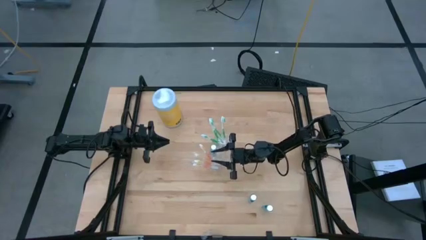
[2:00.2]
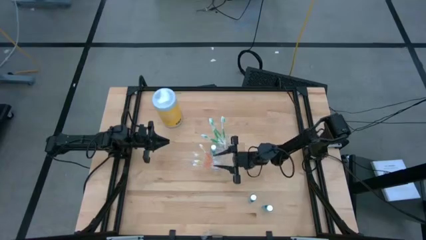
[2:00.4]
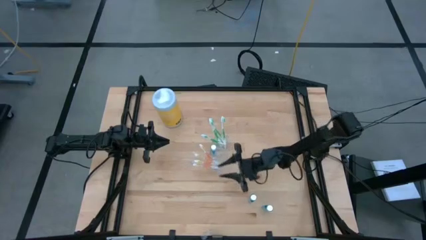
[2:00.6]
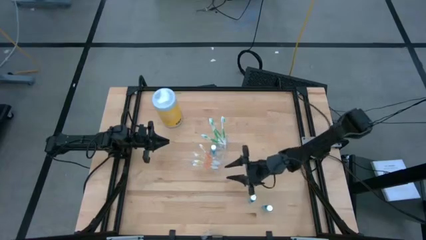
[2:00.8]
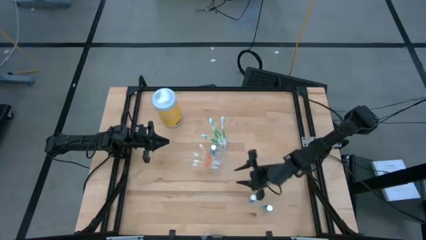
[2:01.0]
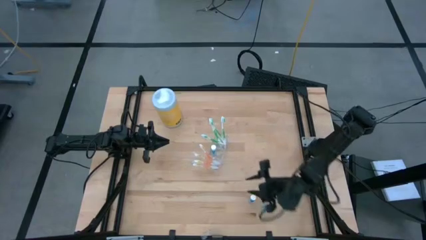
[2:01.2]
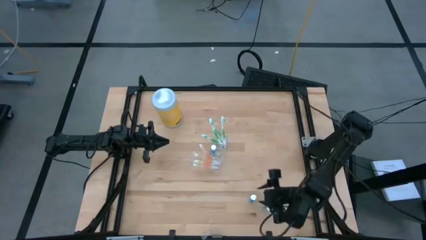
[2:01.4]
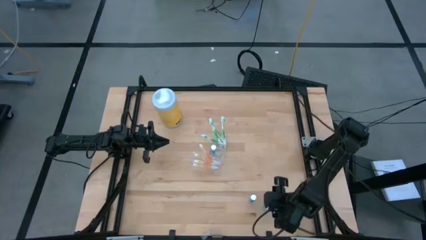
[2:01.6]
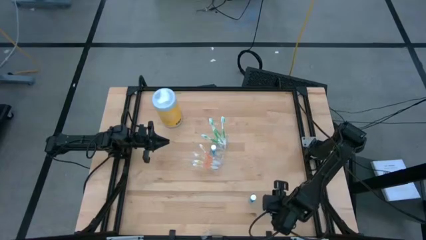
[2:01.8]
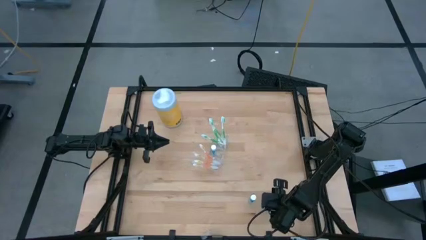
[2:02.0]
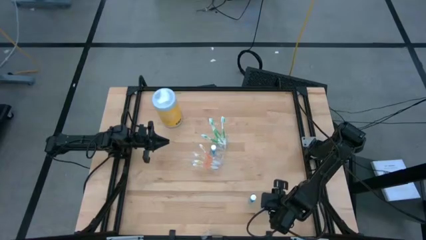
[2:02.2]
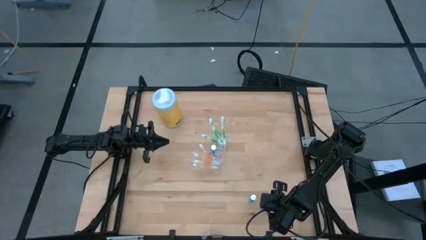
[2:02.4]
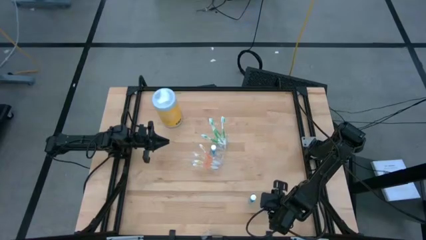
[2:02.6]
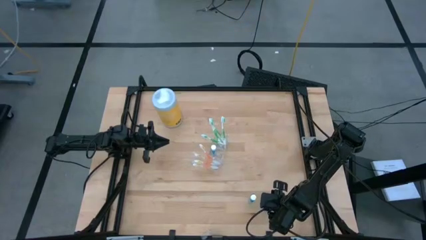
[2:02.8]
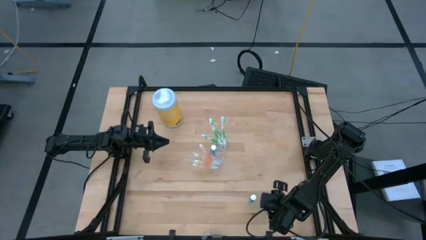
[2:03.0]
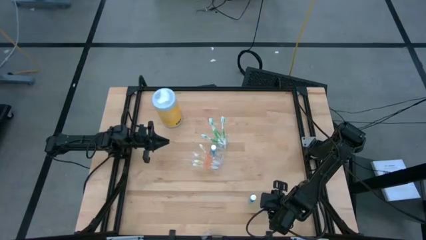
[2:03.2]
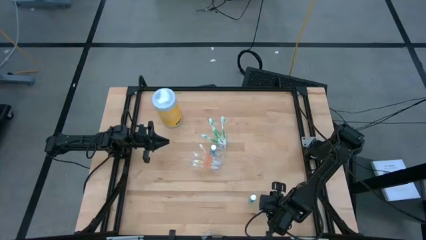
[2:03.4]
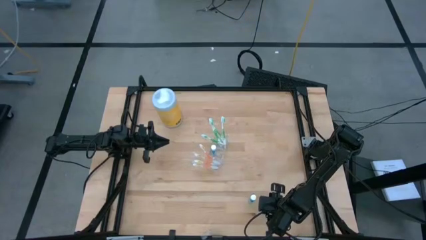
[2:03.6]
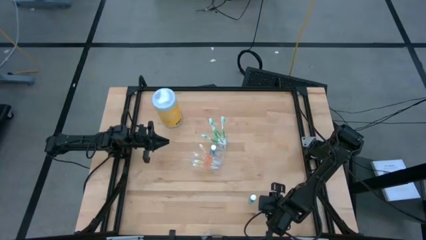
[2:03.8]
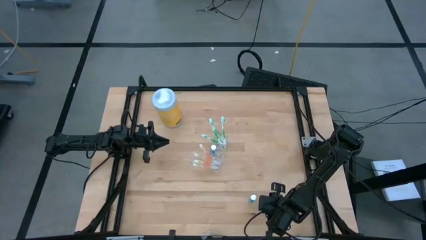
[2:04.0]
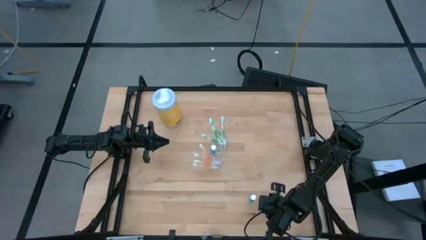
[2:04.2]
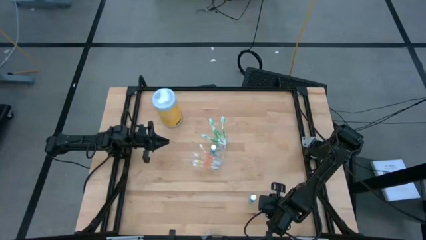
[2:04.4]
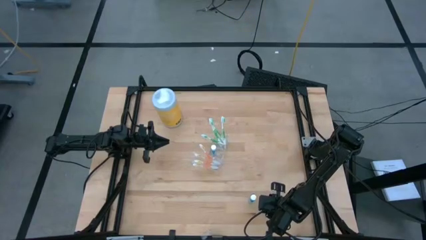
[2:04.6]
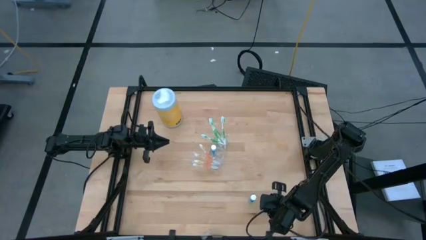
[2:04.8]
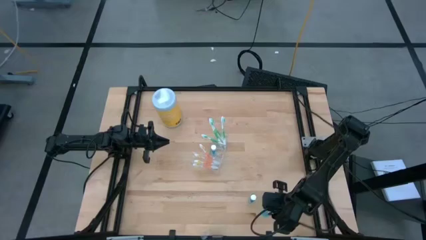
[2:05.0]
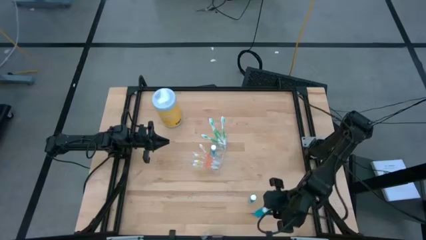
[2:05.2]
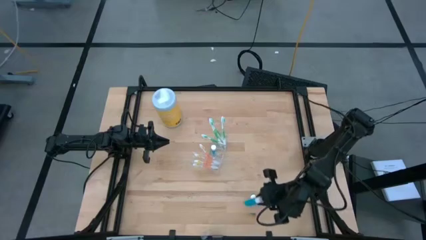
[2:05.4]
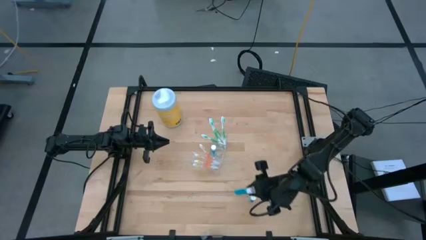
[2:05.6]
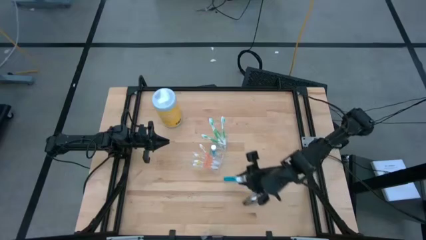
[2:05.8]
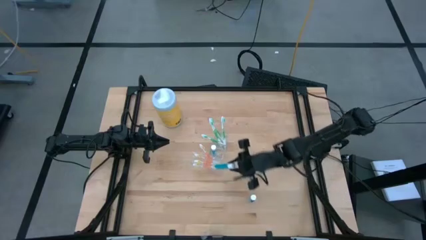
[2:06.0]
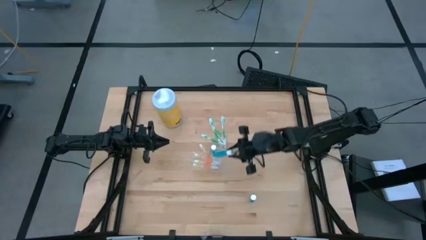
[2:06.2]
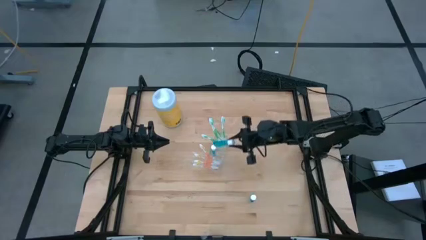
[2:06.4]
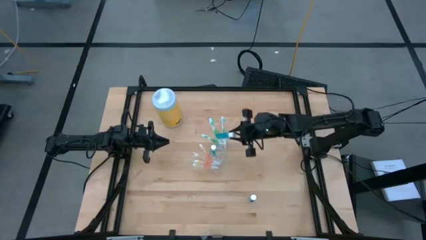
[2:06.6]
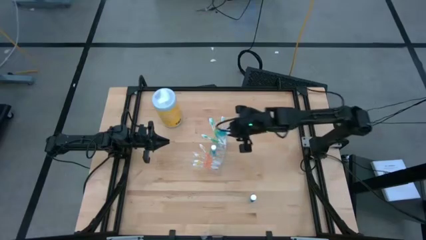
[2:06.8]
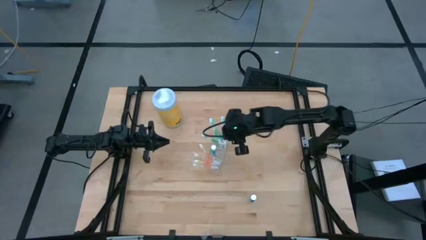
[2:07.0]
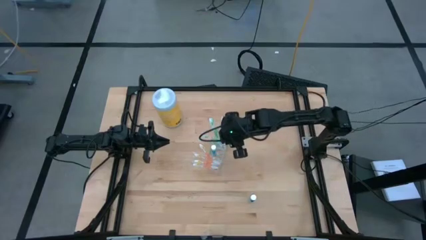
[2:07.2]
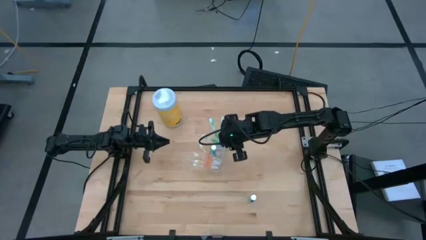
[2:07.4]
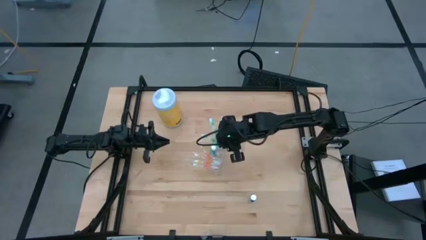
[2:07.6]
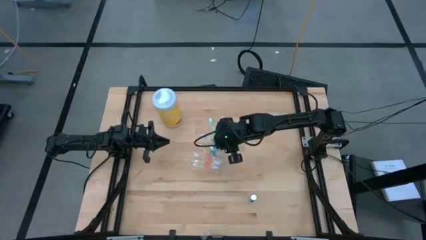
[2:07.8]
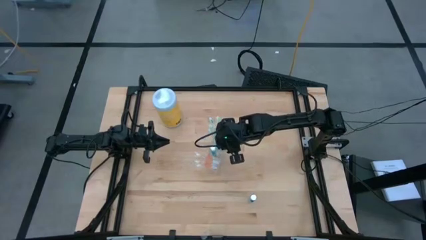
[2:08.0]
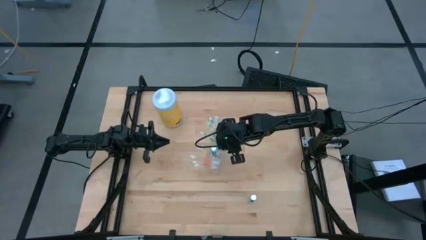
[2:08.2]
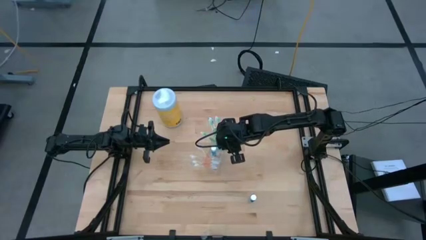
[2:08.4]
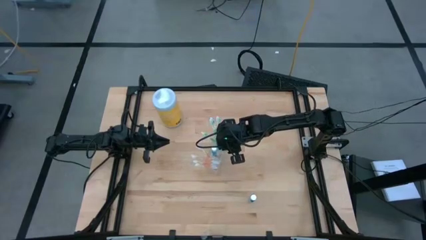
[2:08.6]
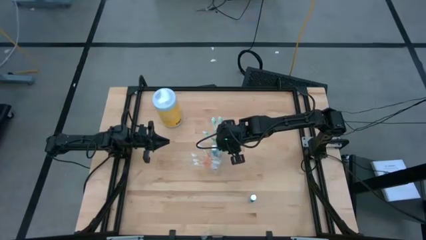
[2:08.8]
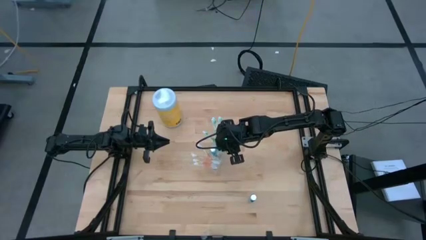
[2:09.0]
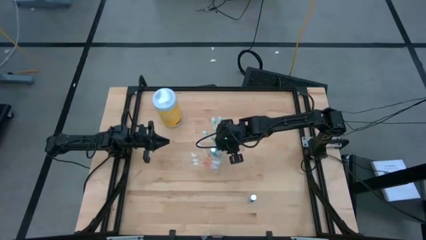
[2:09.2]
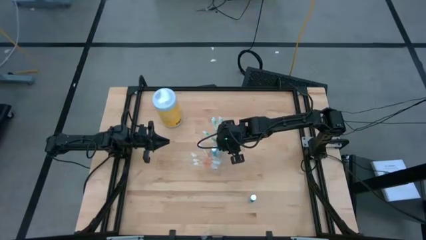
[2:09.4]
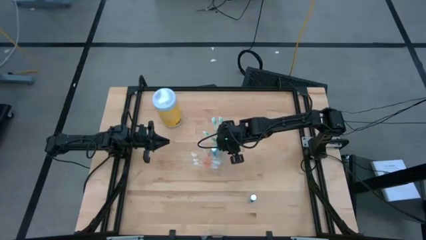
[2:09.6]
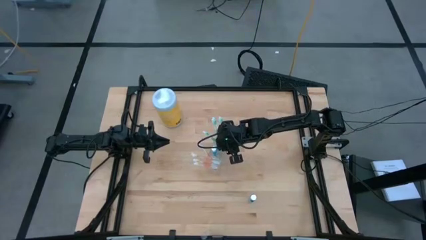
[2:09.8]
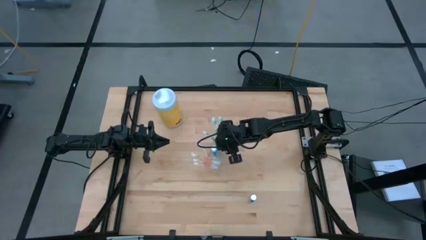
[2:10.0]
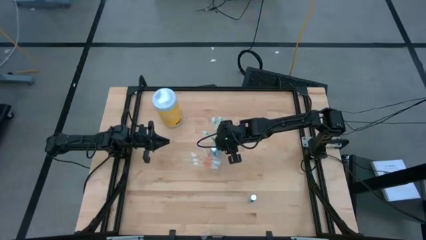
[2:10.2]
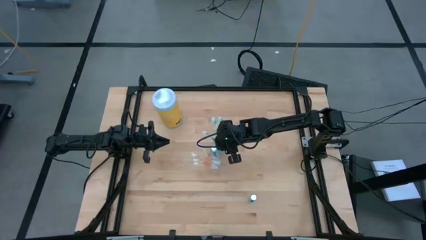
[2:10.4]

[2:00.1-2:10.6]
Task: Pick & Place toothbrushing station
Put the blue mouthwash bottle into the transparent organizer

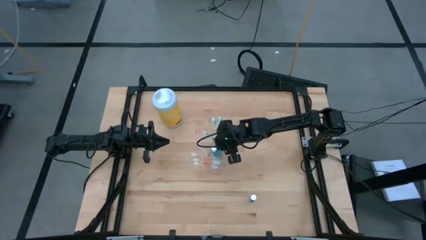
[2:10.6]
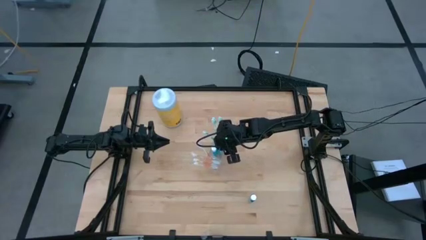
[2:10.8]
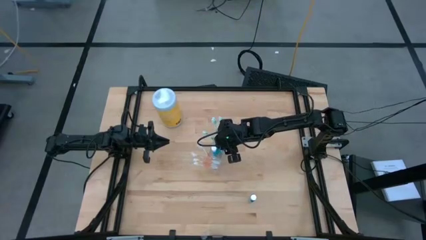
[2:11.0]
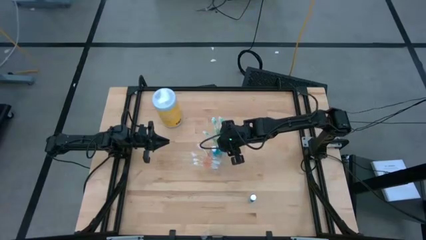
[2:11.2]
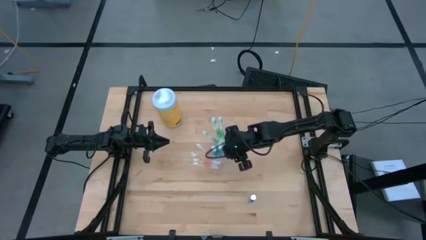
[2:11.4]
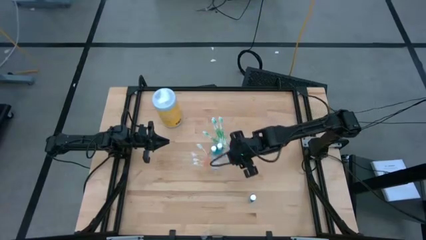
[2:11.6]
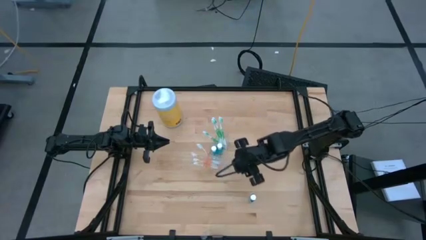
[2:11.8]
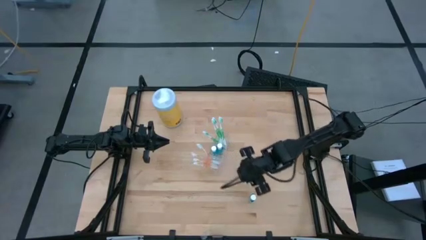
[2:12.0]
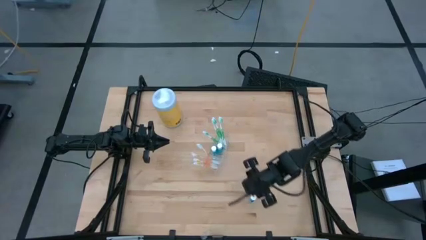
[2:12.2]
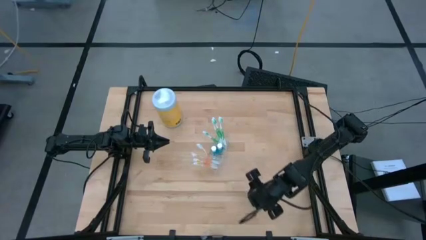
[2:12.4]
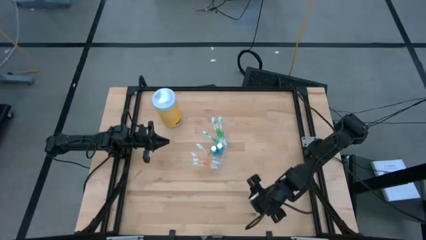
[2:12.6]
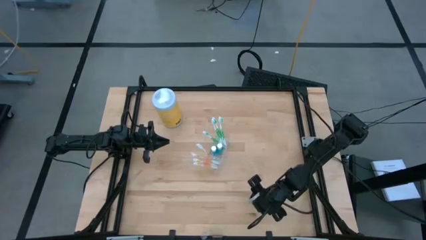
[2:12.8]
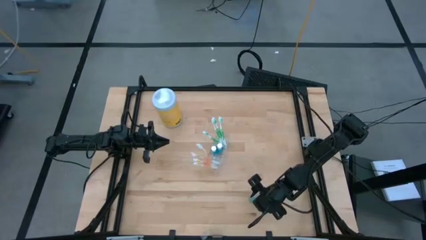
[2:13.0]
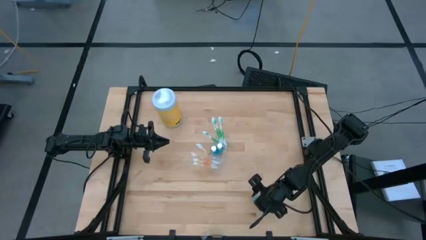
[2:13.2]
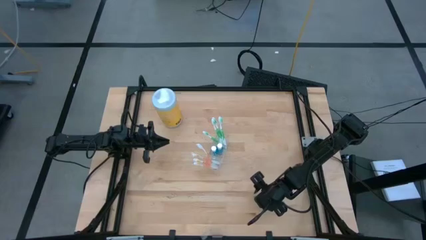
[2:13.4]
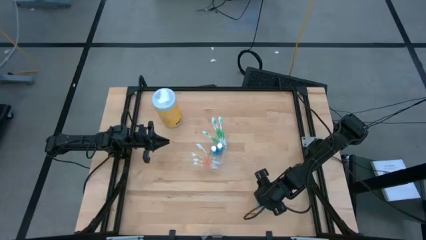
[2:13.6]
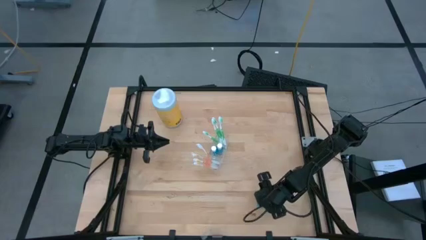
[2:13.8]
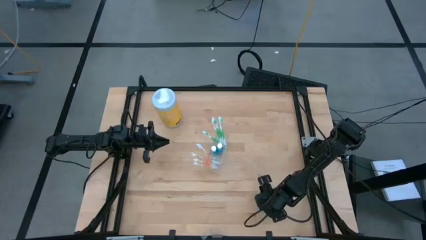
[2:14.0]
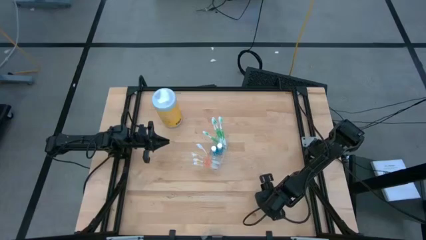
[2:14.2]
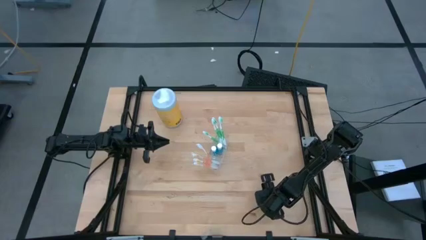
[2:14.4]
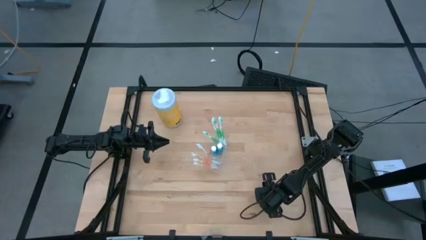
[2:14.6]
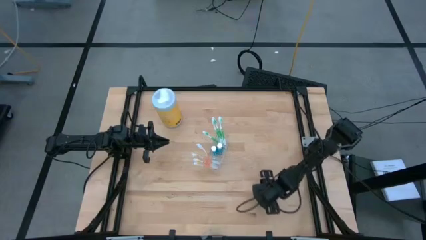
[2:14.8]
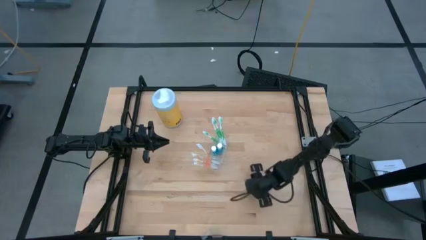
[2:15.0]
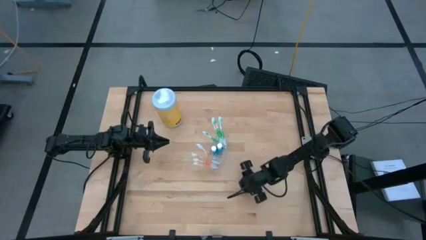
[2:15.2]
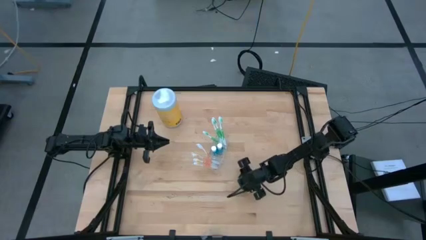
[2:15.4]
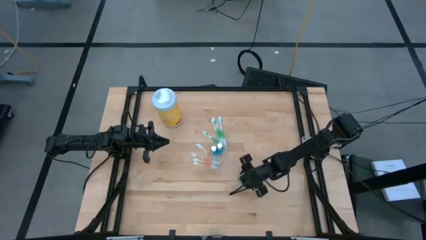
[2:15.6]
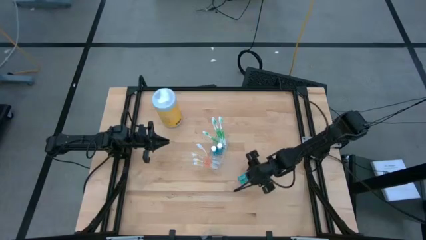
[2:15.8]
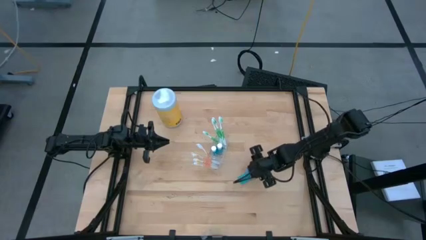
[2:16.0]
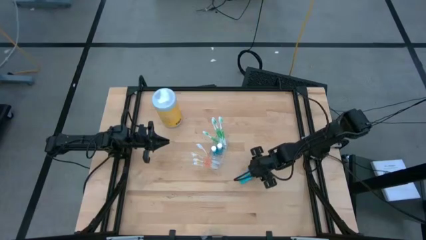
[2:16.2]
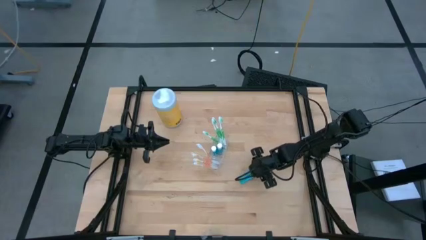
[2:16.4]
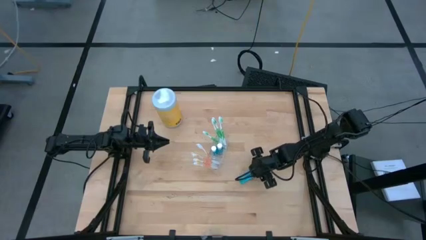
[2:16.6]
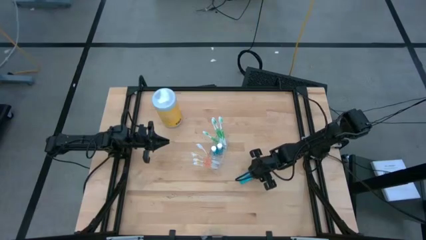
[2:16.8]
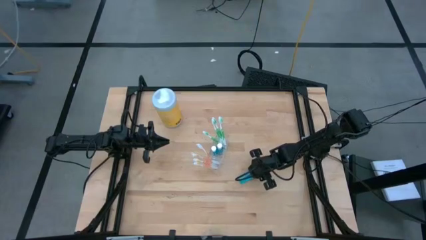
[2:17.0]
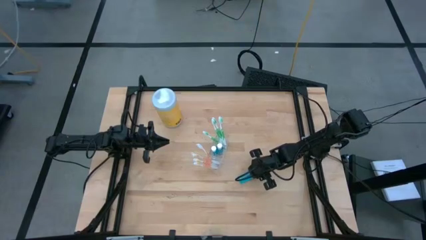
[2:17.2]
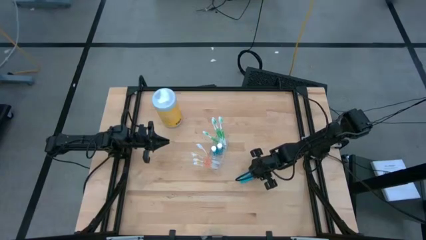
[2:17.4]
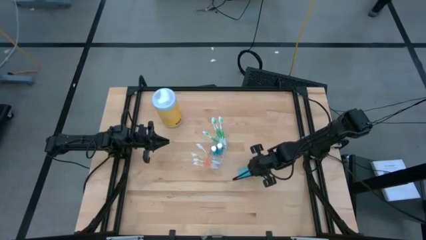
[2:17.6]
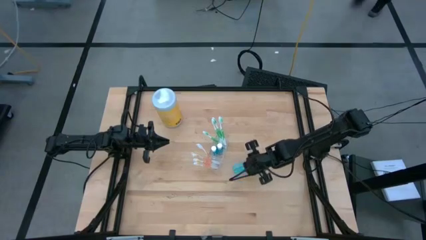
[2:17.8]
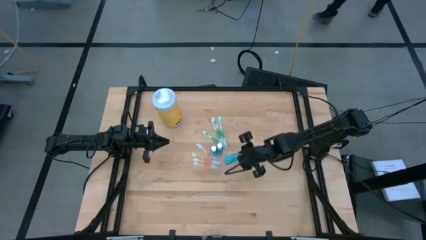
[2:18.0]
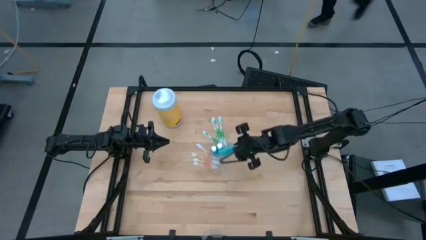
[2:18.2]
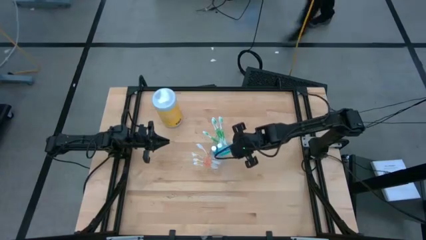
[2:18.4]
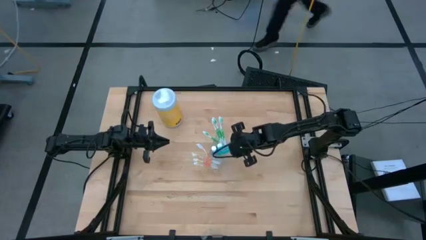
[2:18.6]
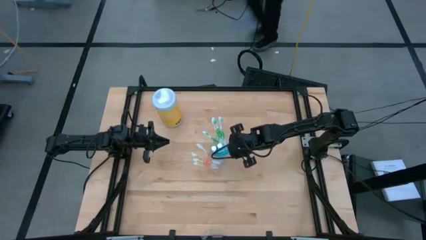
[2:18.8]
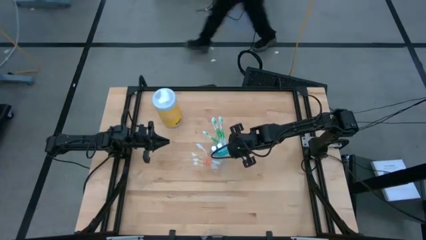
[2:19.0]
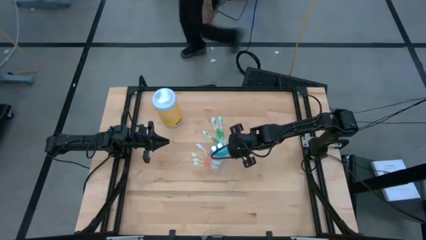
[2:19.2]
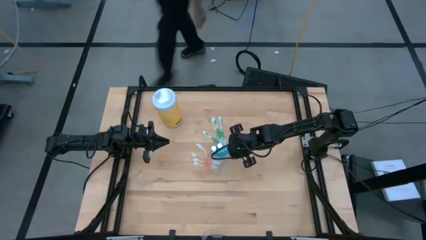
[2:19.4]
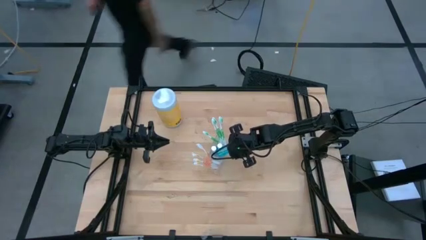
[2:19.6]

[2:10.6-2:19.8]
Put the blue mouthwash bottle into the transparent organizer
